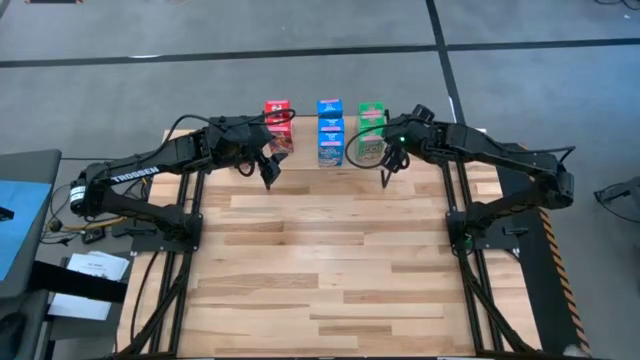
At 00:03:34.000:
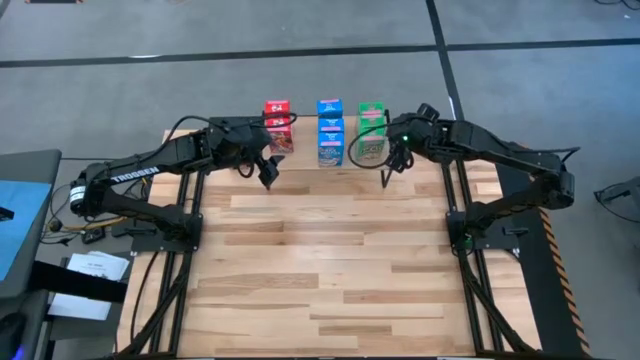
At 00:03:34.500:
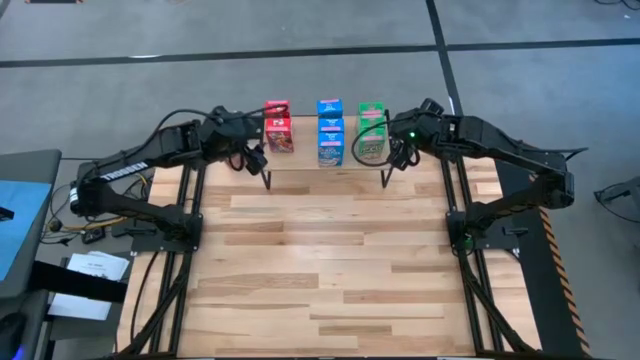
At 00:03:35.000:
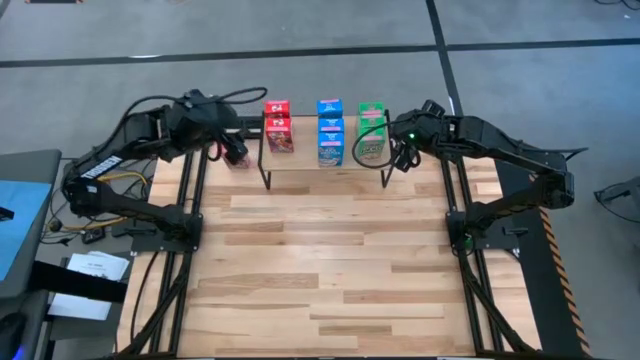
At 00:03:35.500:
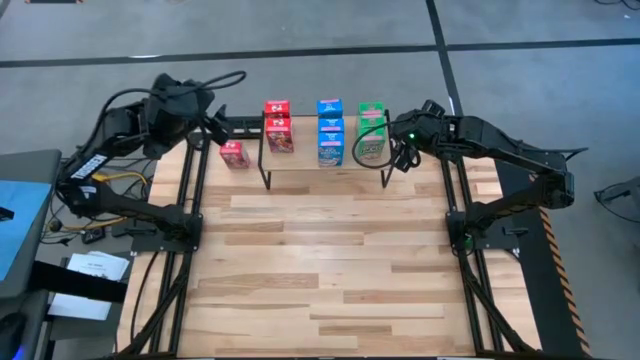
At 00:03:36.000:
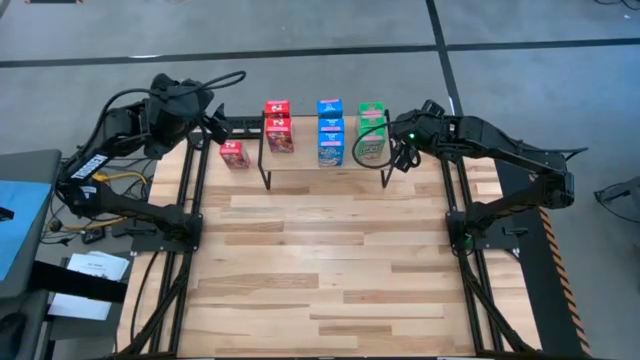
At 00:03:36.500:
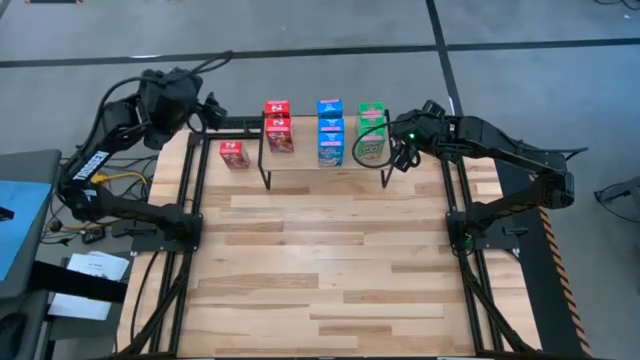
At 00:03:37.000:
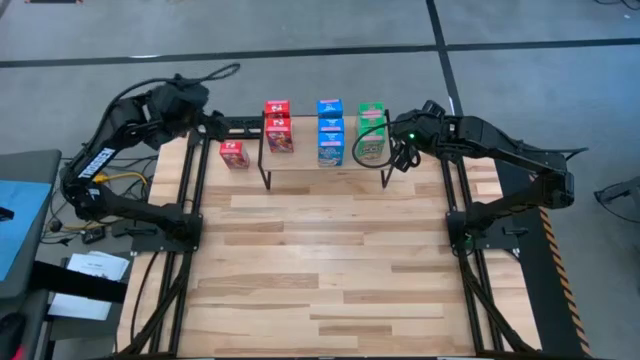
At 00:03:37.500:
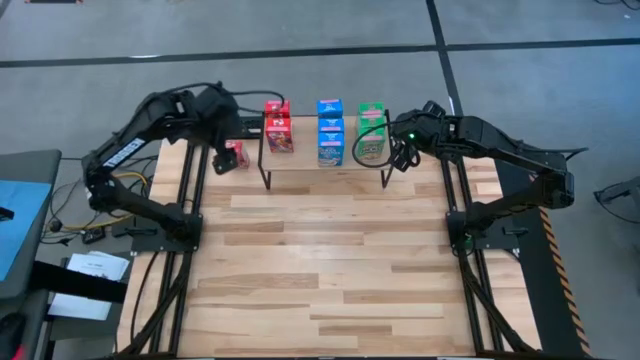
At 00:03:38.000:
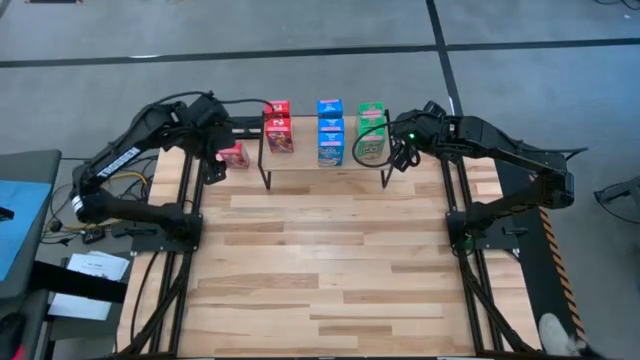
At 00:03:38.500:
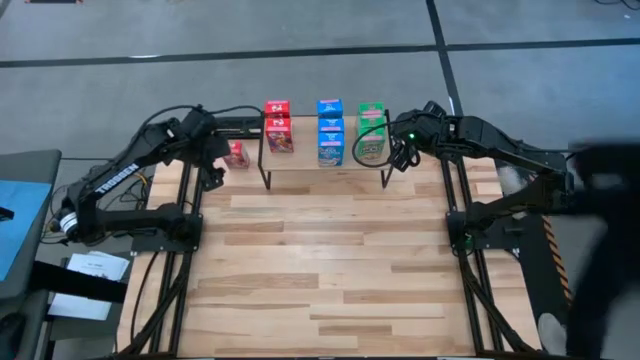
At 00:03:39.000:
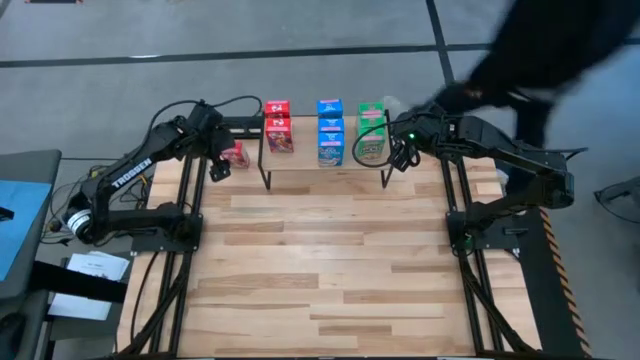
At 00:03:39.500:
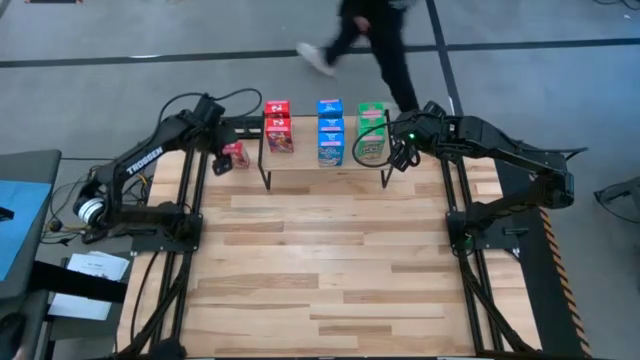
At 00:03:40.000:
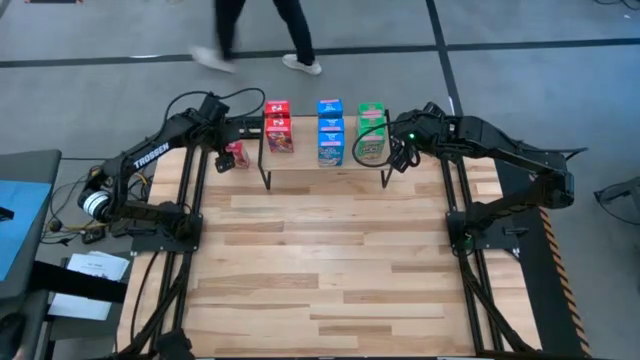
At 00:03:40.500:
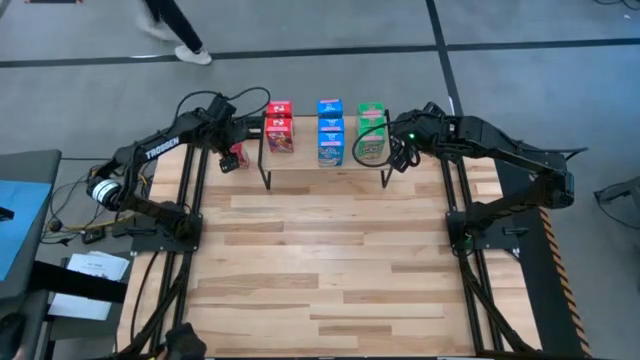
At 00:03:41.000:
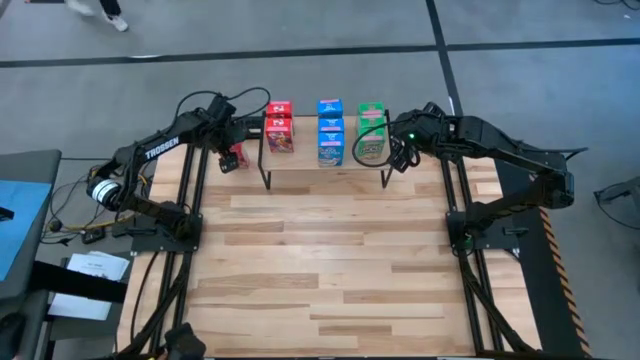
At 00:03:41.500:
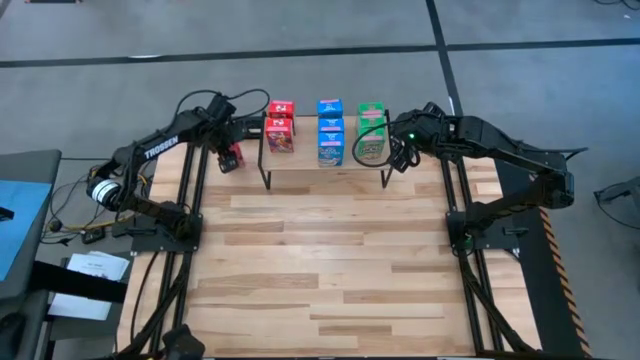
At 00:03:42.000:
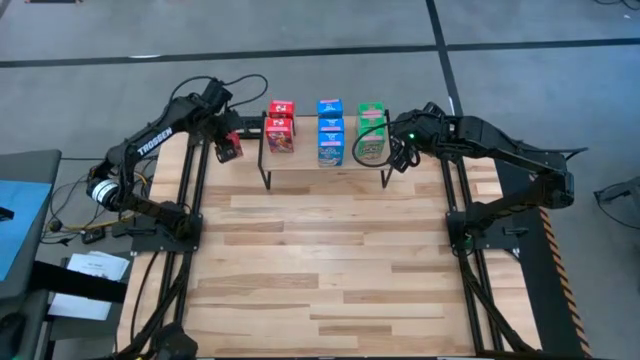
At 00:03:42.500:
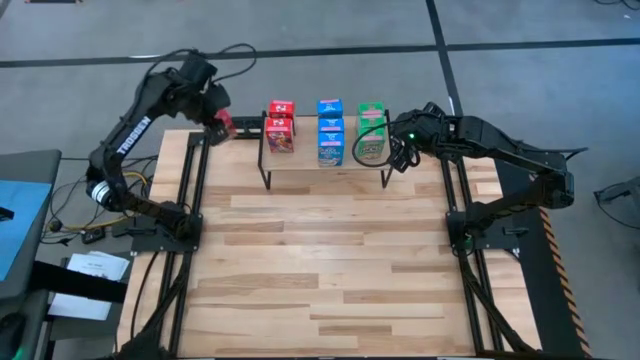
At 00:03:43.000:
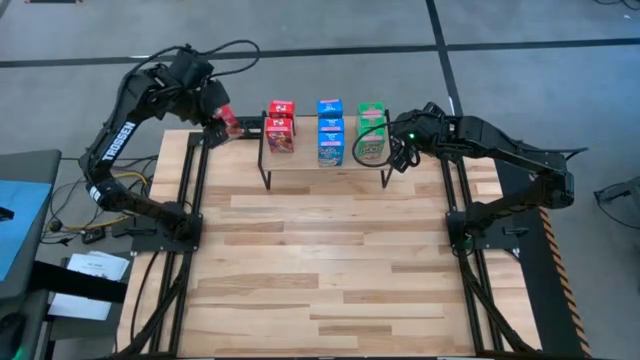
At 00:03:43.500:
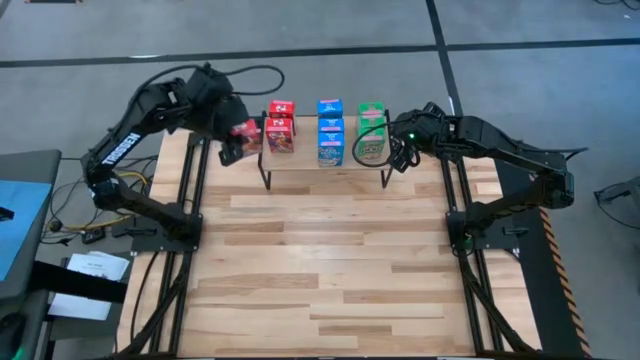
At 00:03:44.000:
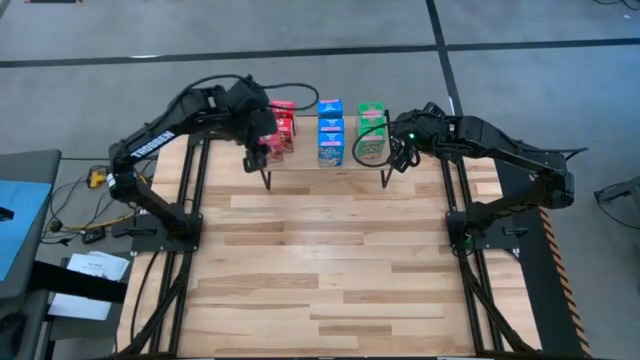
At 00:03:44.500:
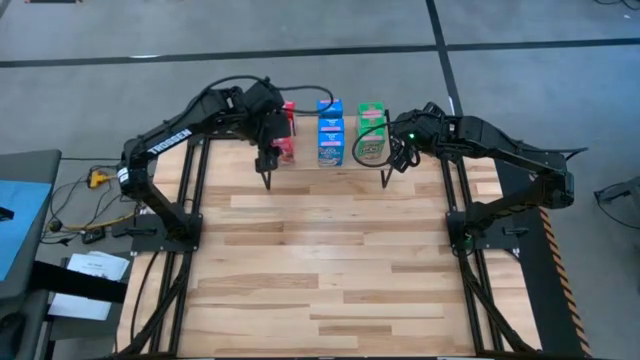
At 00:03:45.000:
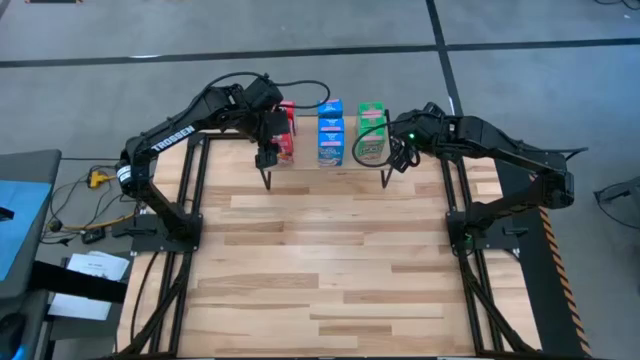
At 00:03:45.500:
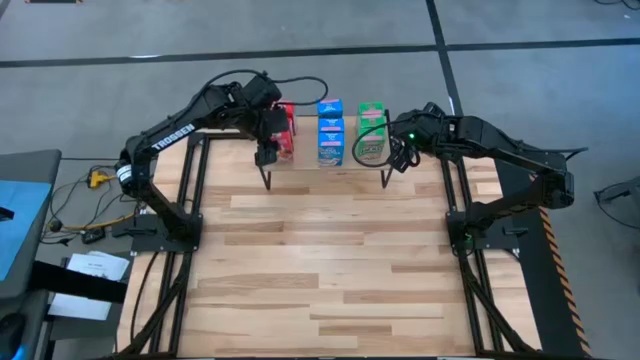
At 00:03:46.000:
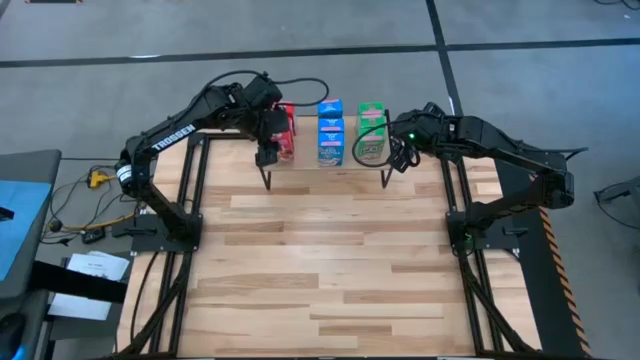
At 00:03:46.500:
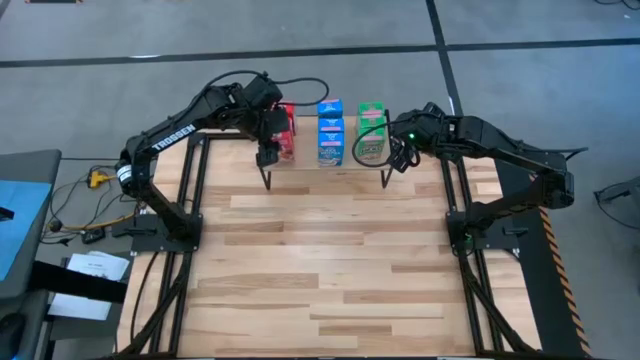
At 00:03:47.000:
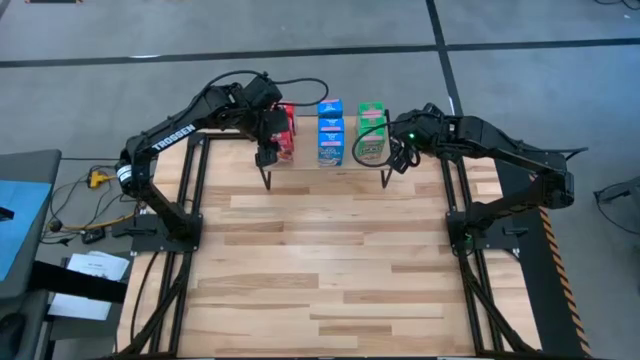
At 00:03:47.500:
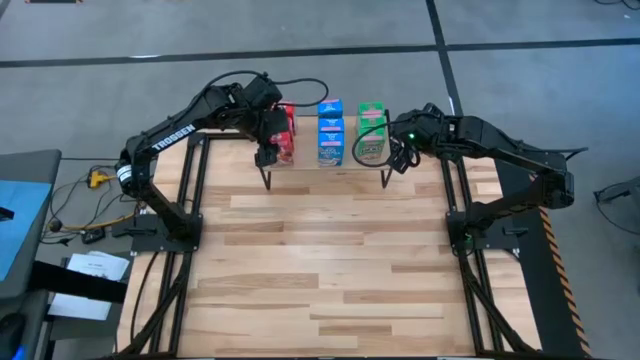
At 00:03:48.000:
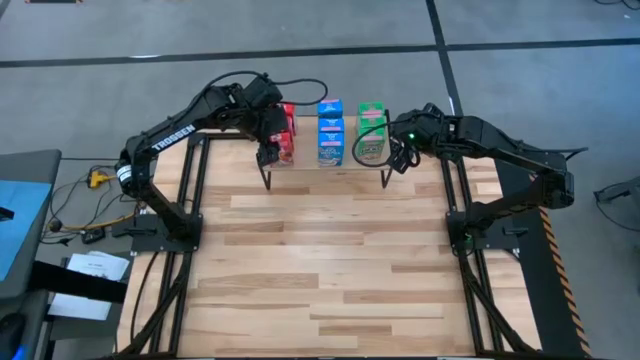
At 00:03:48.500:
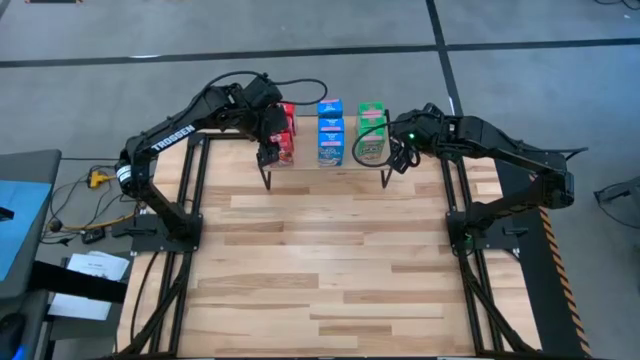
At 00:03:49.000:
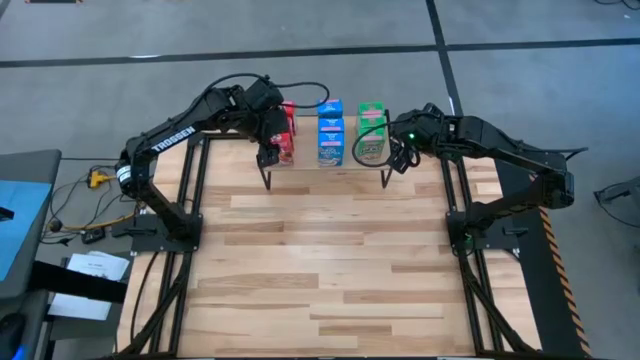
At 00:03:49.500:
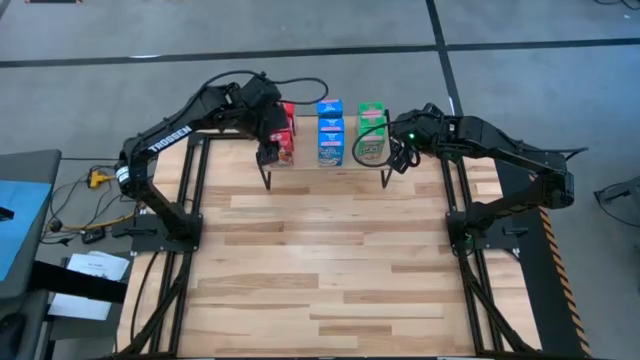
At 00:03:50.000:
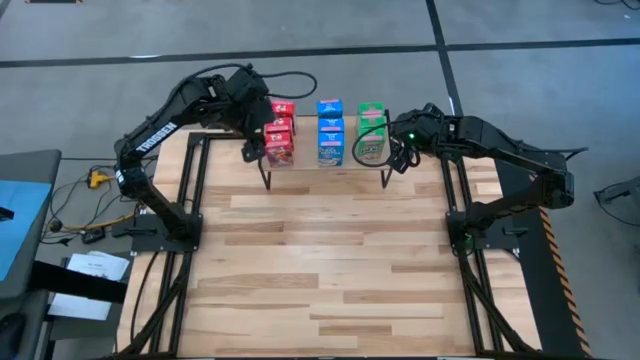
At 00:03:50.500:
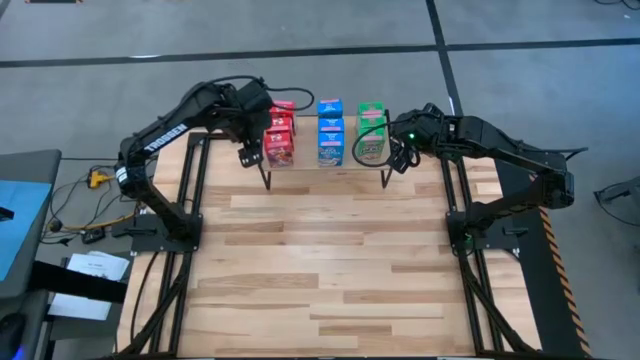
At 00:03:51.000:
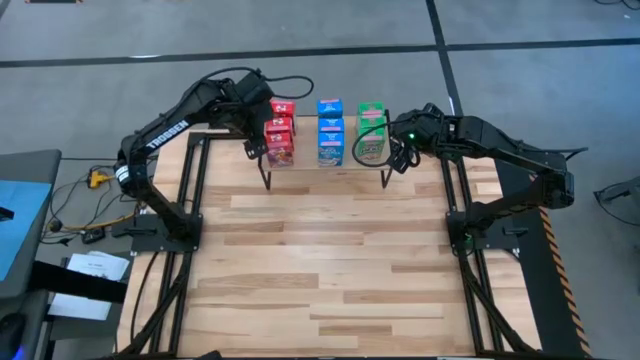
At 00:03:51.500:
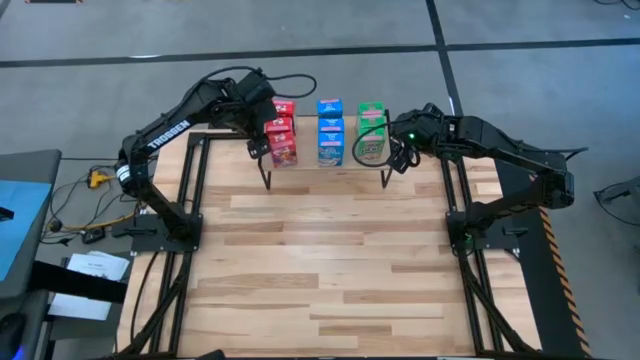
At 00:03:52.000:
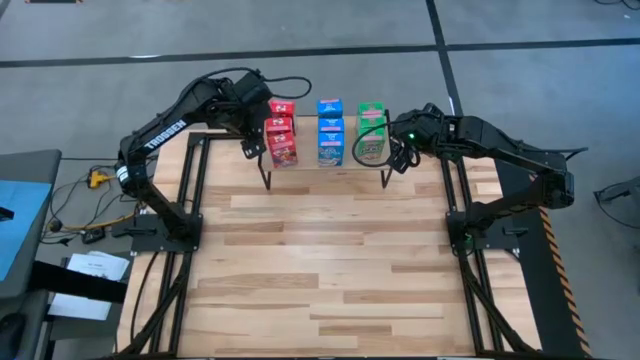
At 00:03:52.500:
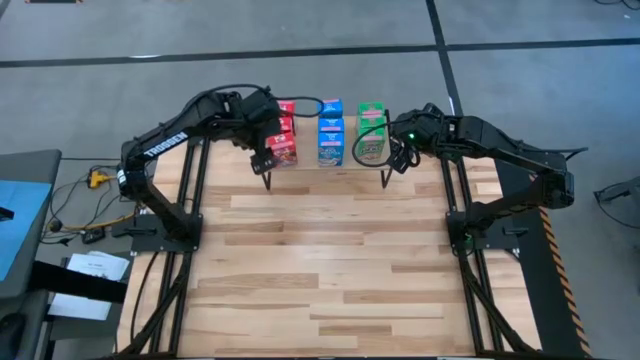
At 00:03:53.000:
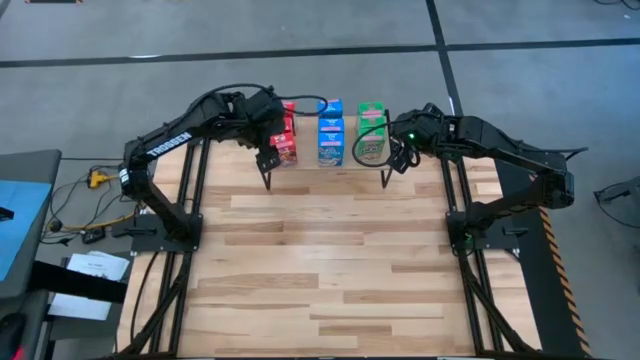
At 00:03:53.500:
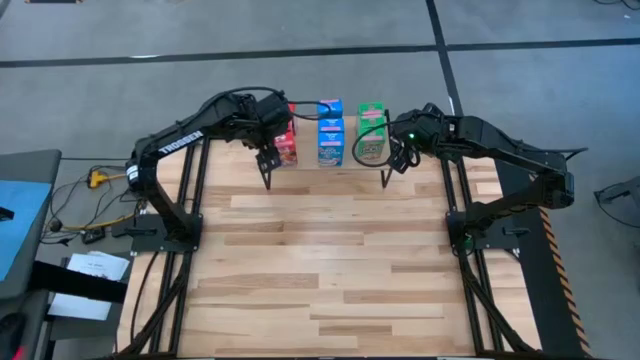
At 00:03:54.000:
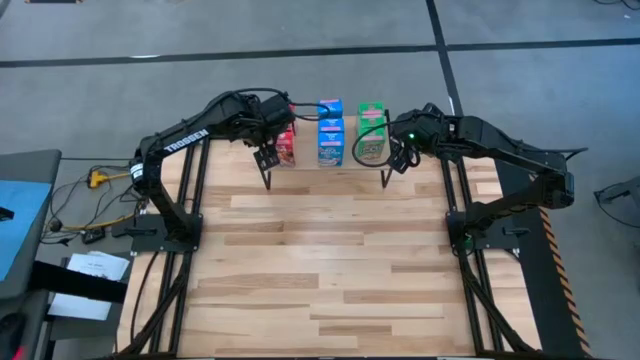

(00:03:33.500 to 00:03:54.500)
Task: Stack cereal on shelf
Put the red cereal box on the shelf aligned with the other red cereal box
